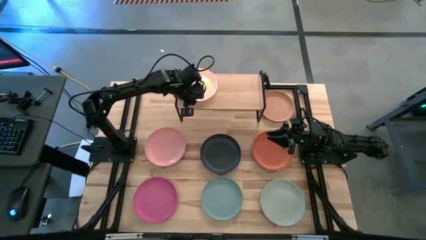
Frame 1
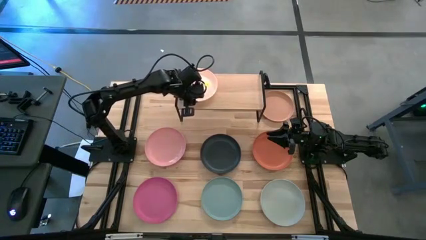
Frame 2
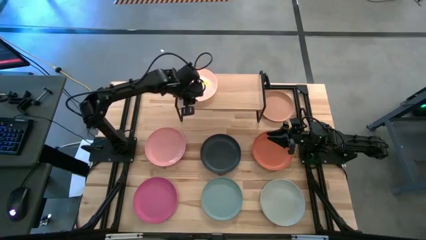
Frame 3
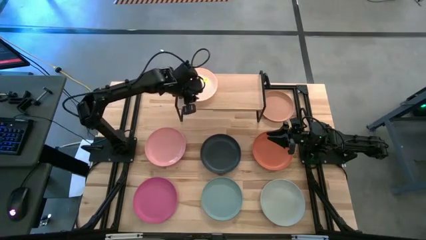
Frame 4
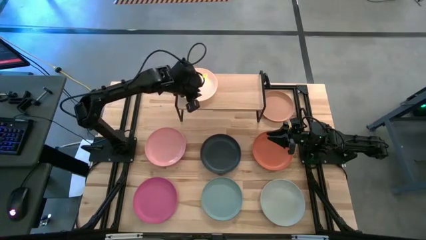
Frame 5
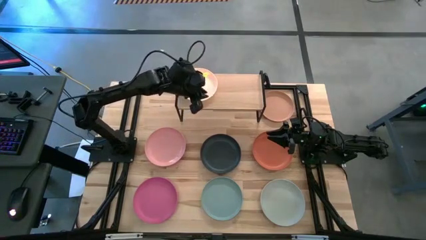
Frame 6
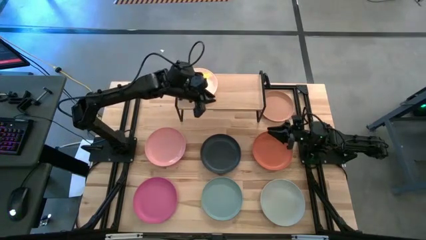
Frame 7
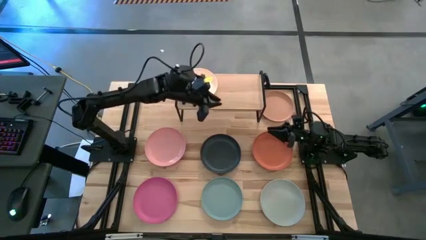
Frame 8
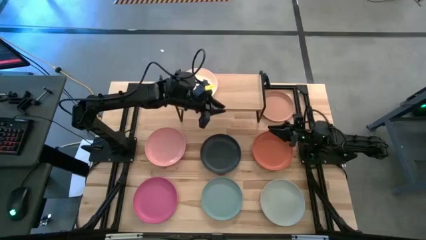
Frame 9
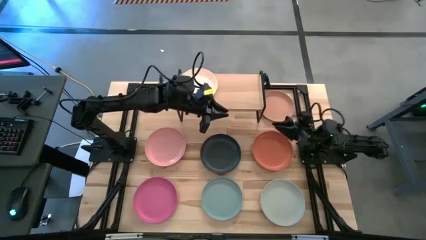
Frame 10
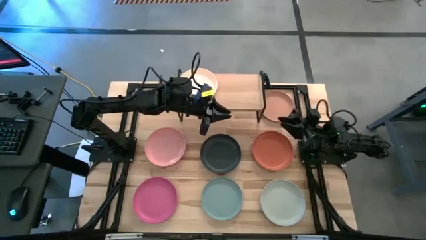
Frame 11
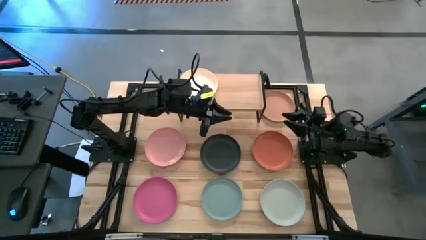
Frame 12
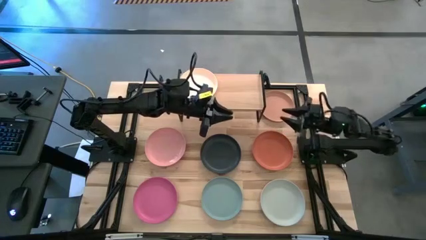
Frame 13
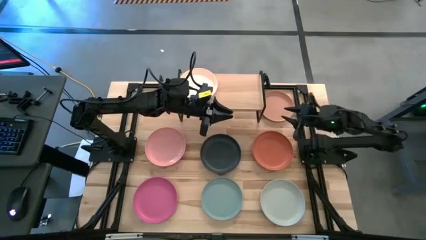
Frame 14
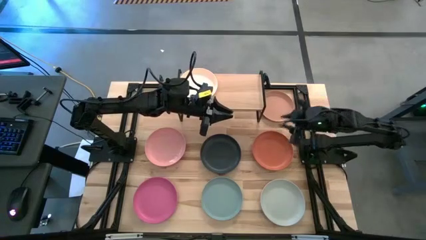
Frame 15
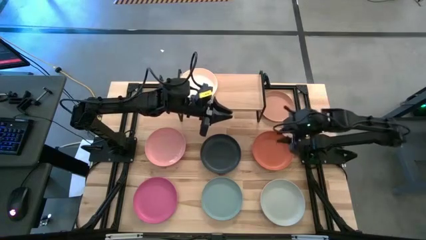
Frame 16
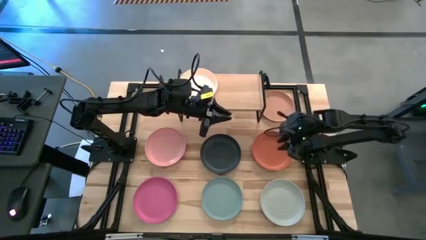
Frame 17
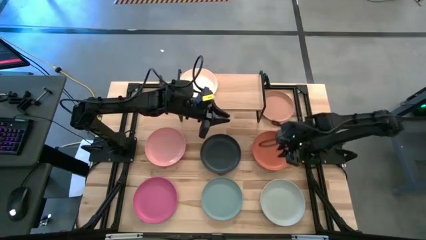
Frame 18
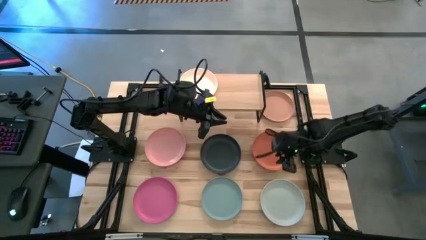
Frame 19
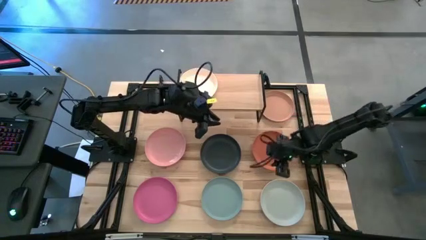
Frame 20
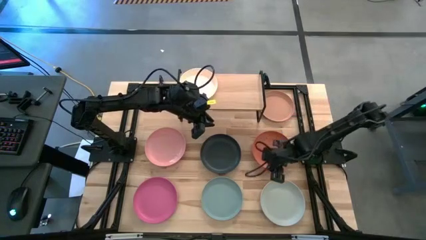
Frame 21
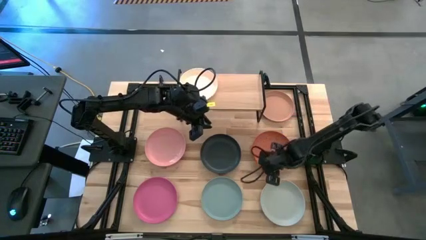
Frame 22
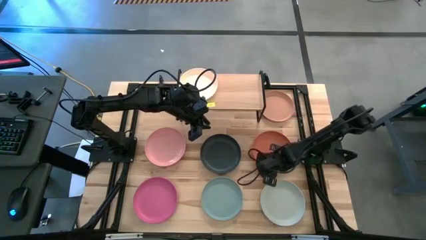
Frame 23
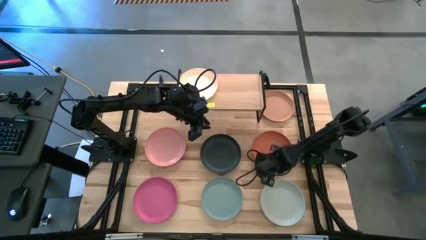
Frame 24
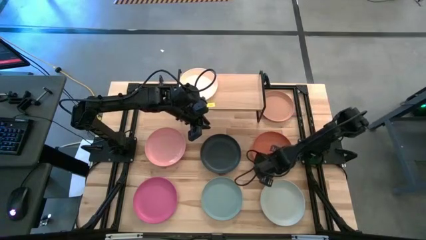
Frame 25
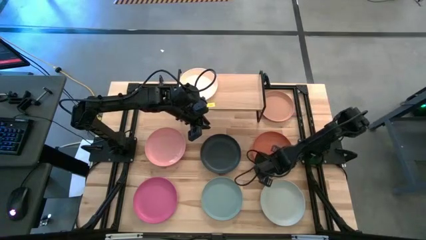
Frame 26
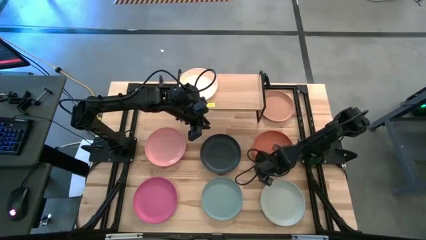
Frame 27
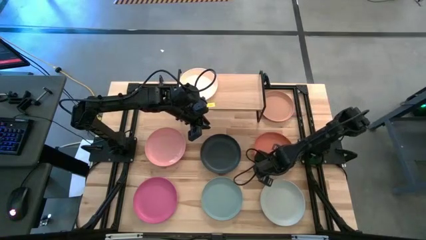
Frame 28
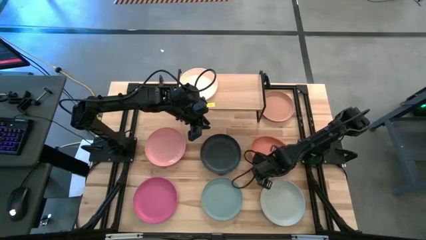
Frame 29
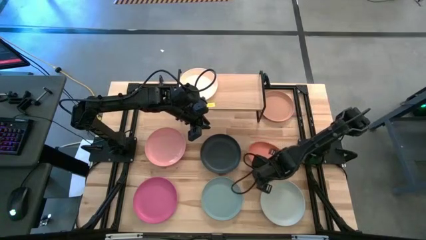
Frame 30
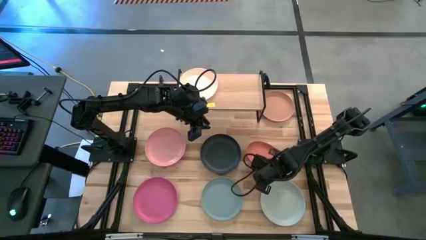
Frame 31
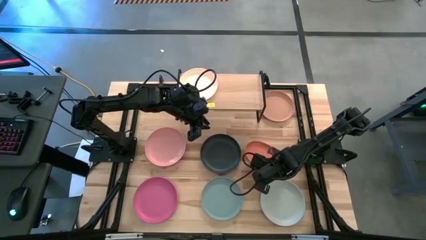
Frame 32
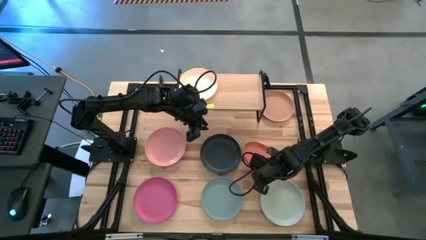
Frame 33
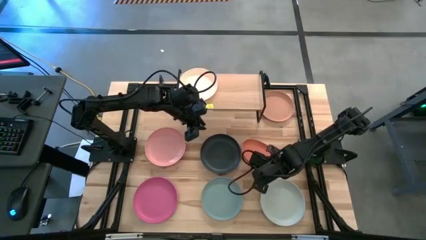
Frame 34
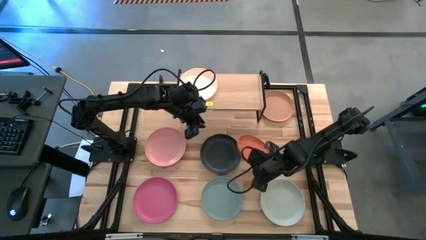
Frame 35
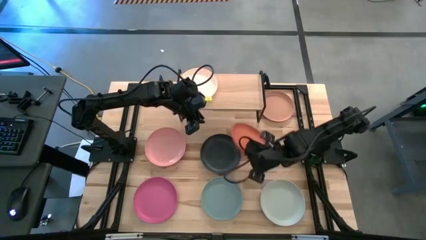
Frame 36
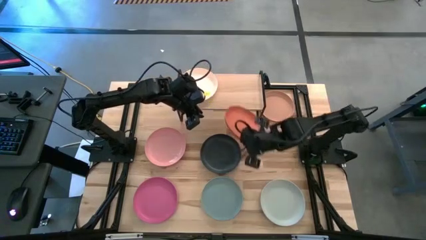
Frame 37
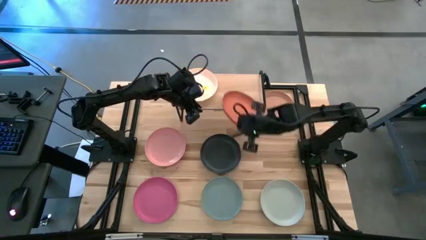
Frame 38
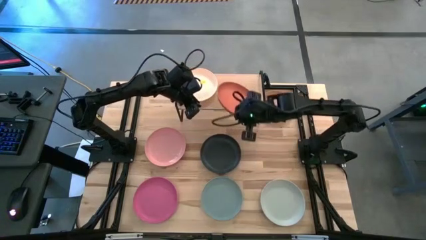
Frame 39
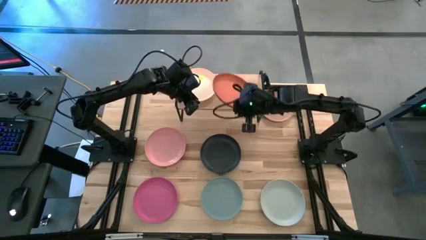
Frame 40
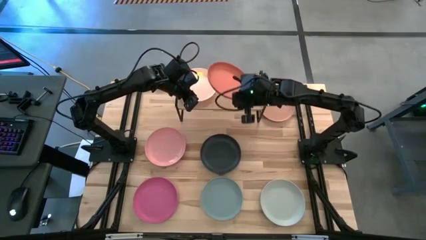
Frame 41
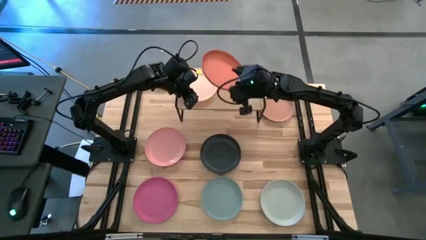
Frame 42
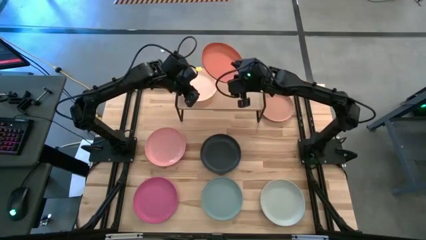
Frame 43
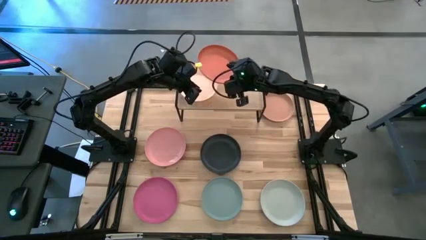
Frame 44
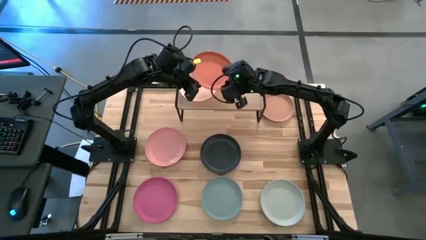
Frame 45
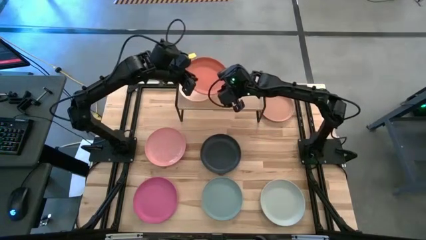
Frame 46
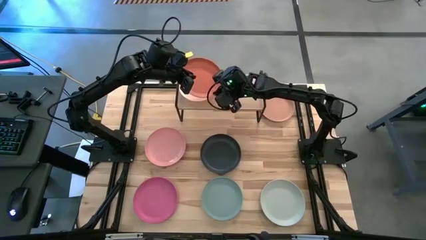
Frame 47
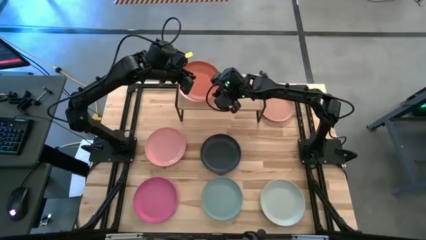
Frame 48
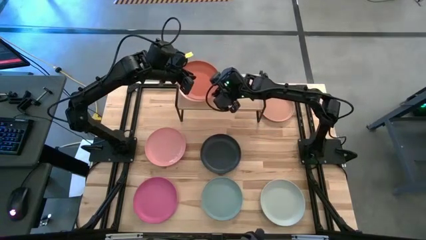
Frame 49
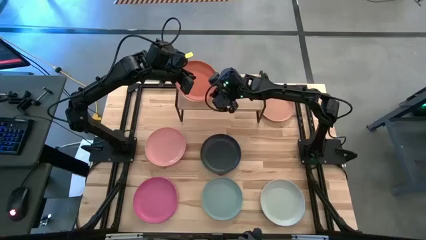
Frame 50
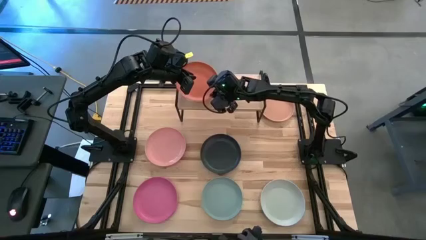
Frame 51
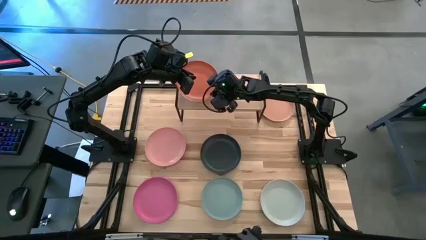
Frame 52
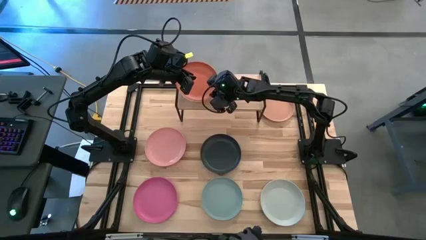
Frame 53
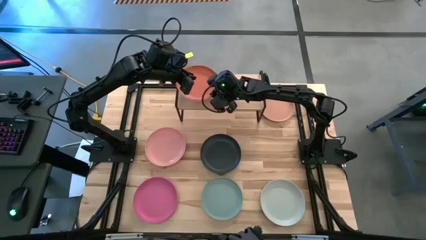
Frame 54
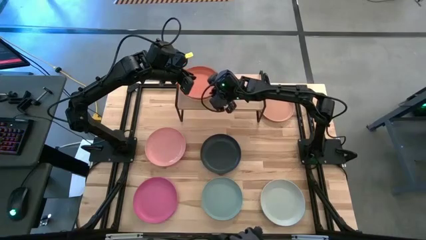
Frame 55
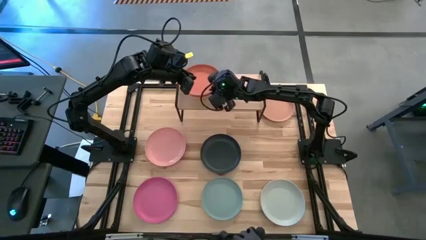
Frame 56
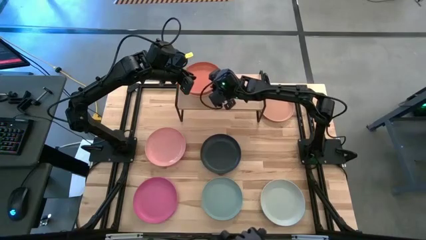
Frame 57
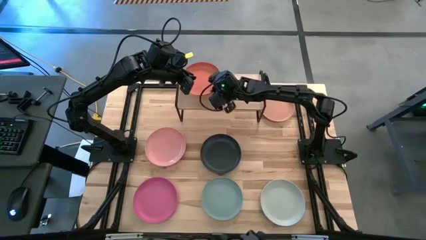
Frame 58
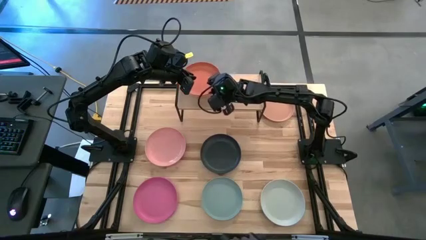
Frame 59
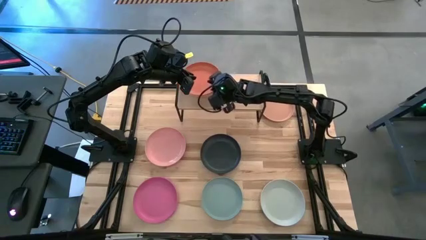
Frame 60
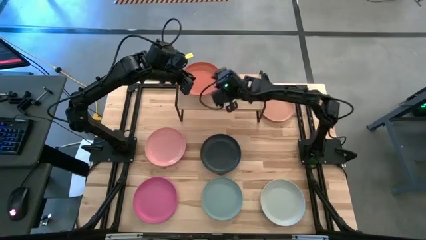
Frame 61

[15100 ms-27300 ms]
Task: Place and stack plates onto a shelf
Stack the orange plate on top of the light orange plate on the shelf

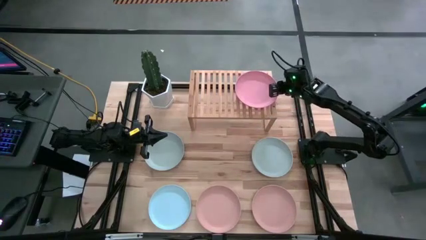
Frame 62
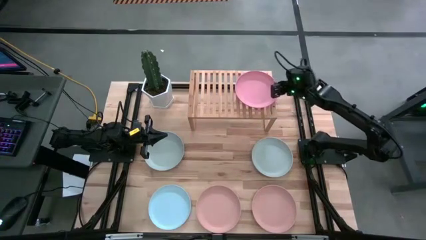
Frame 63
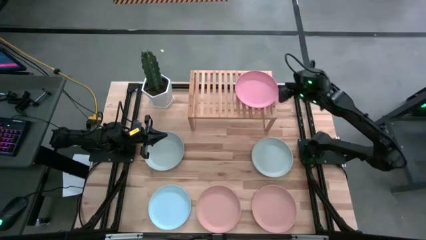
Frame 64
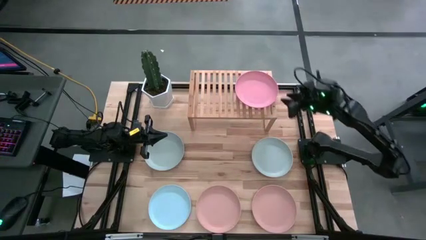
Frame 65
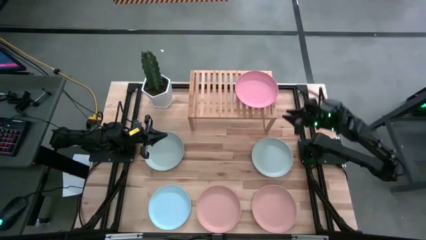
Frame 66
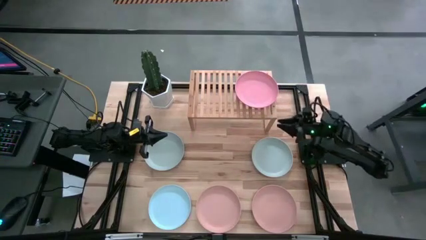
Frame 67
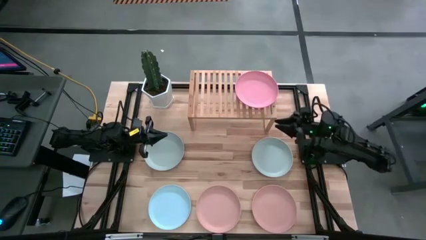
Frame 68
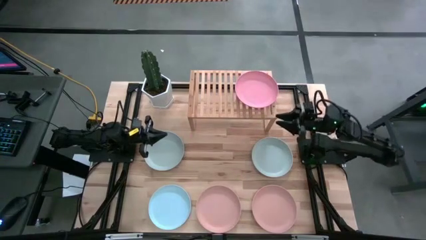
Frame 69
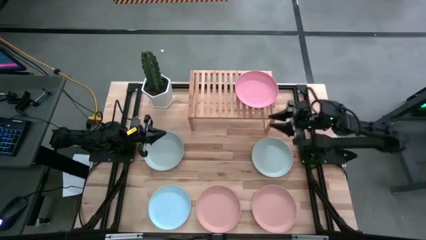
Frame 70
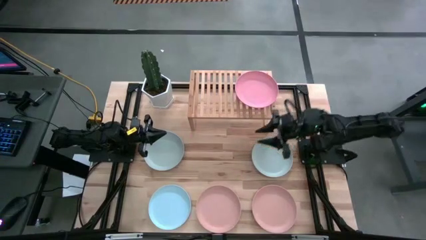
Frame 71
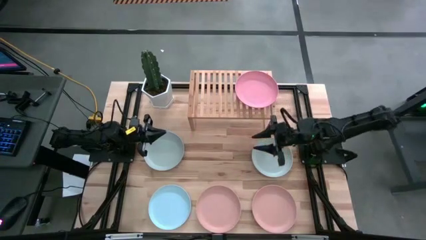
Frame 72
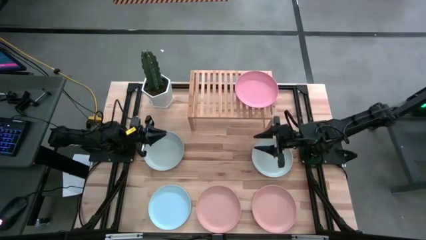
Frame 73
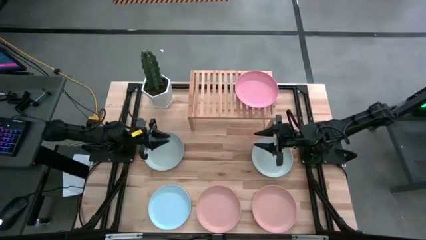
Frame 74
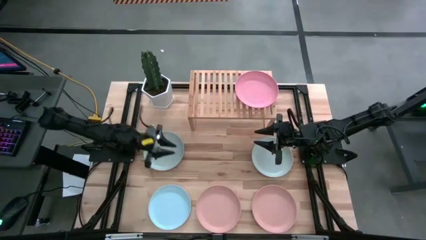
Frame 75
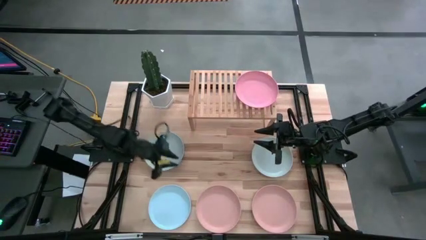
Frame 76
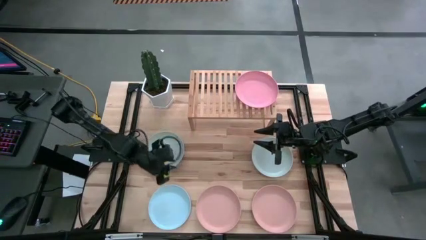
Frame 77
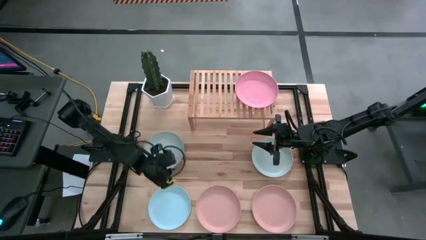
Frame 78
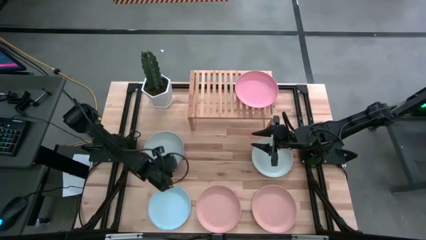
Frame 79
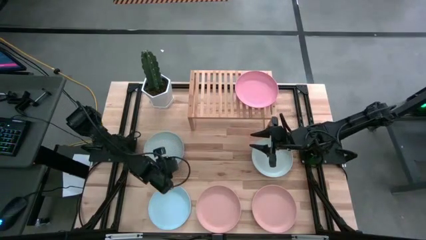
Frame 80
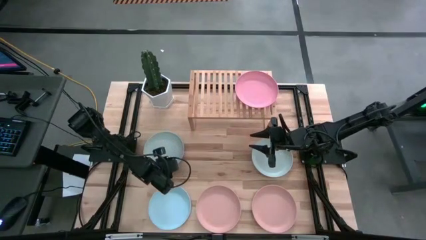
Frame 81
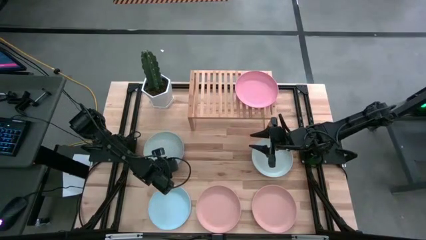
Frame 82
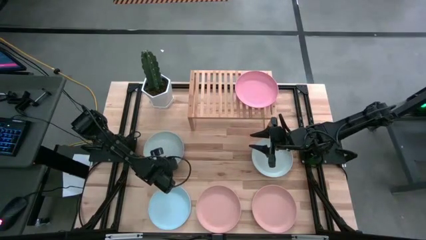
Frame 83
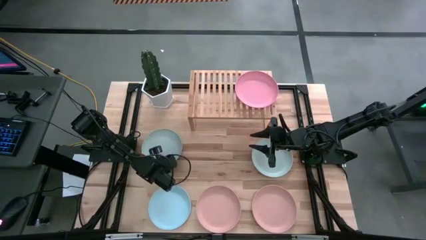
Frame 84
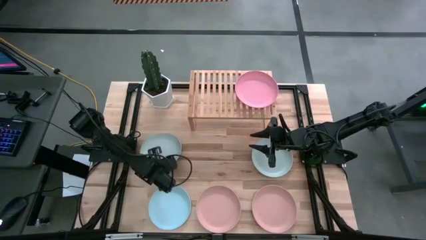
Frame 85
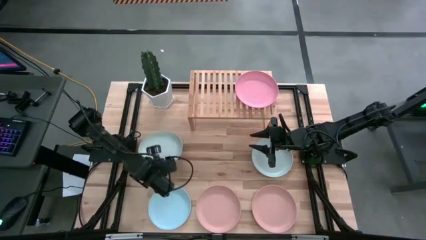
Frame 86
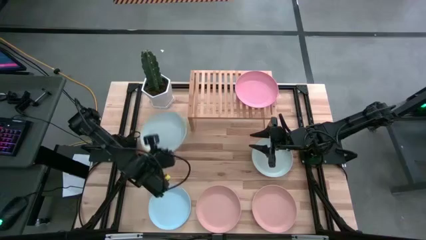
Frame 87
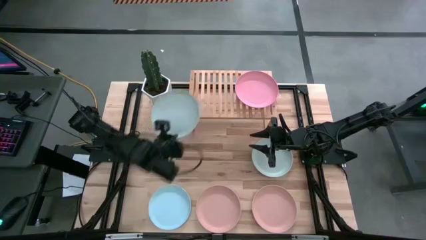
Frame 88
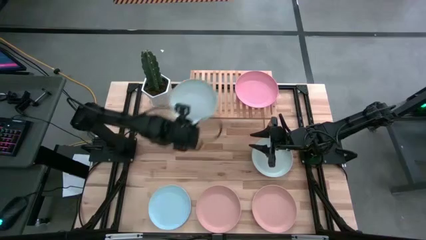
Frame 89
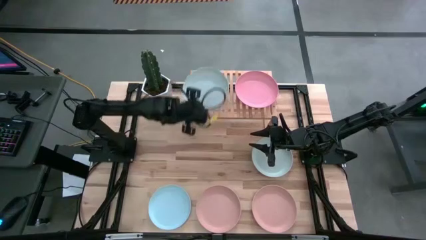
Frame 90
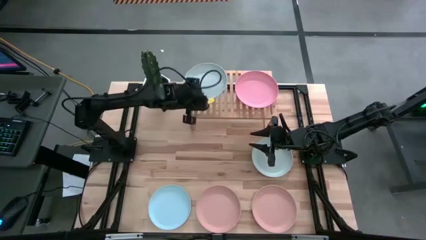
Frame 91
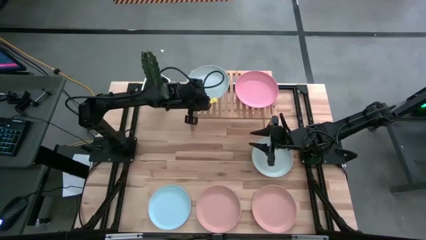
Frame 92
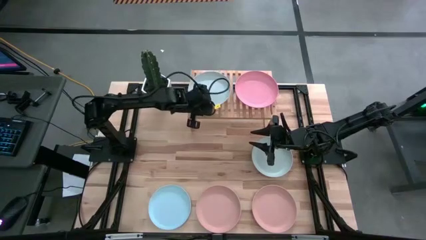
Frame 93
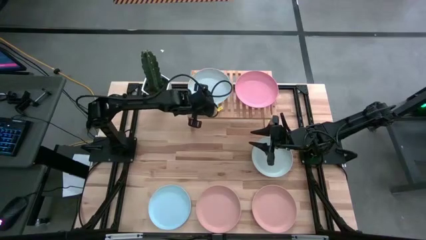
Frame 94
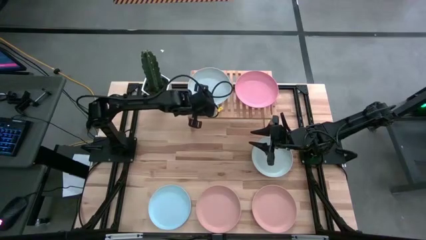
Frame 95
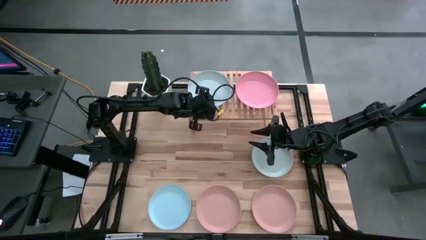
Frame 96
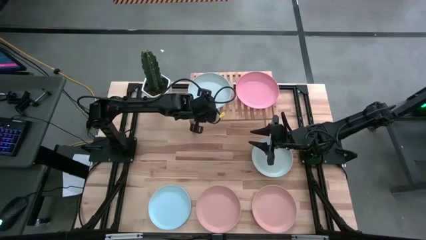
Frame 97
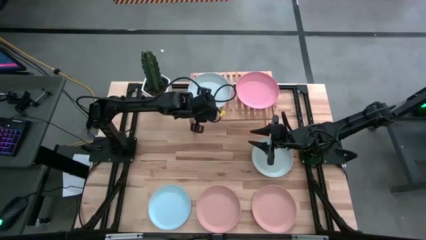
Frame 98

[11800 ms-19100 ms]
Task: Place and stack plates onto a shelf
Put the left light blue plate on the shelf
